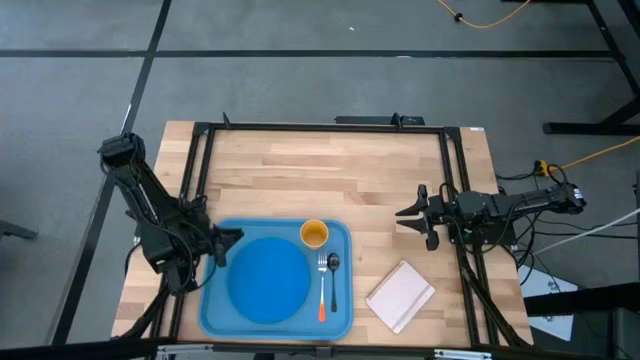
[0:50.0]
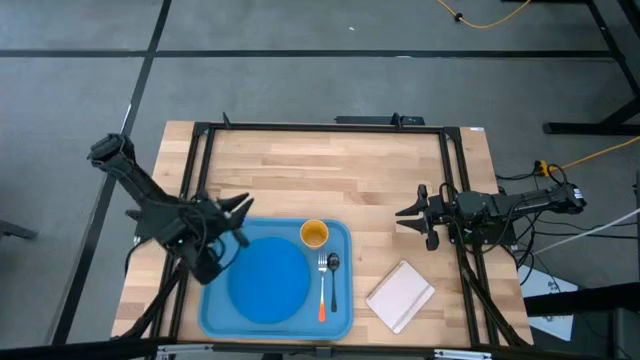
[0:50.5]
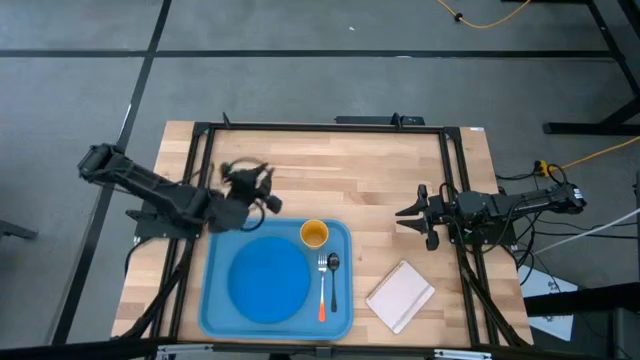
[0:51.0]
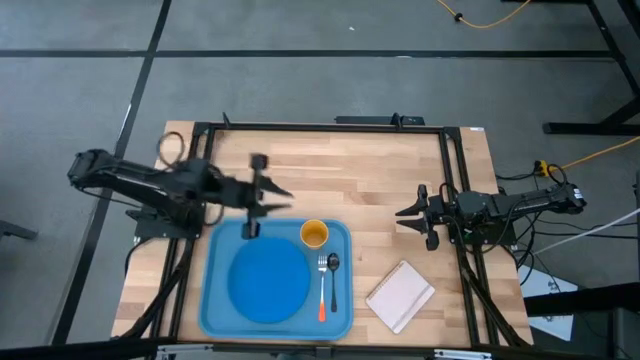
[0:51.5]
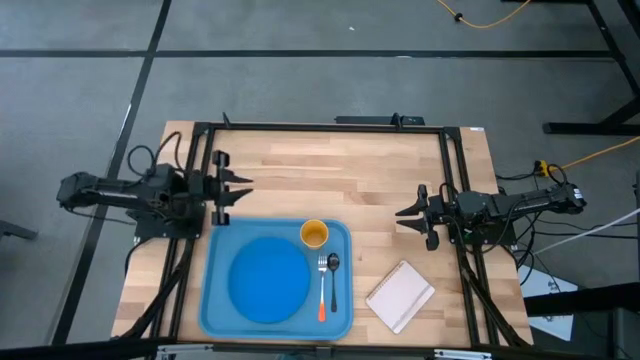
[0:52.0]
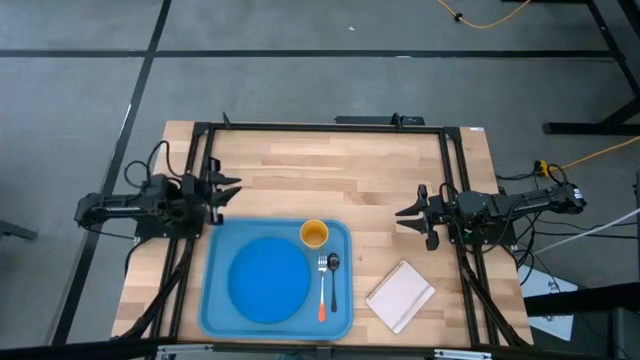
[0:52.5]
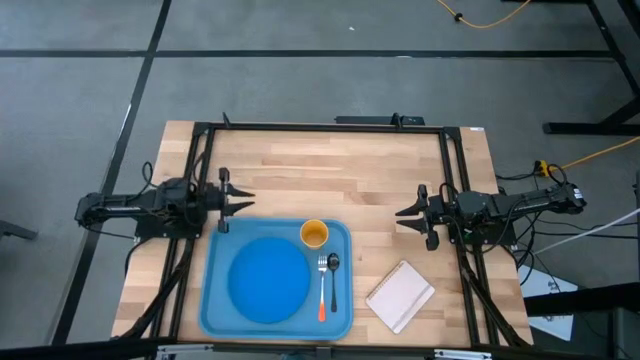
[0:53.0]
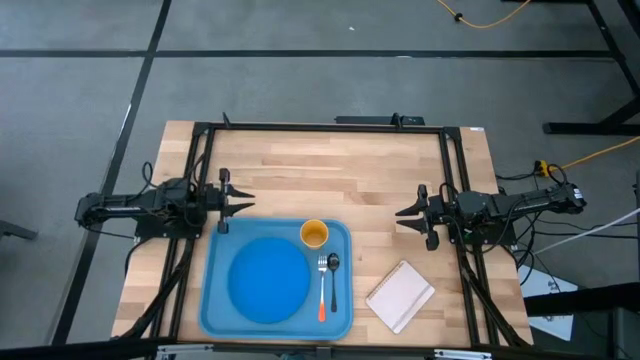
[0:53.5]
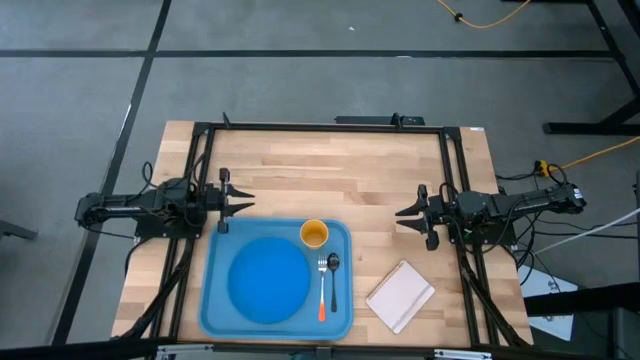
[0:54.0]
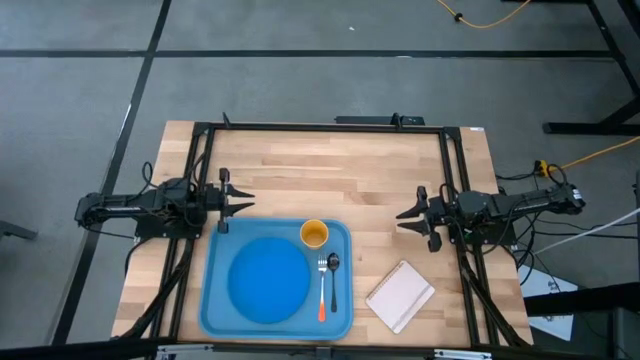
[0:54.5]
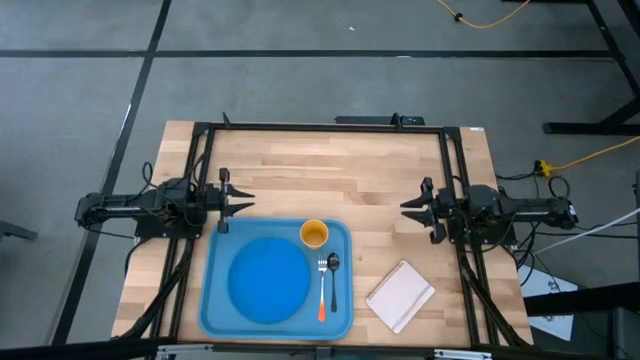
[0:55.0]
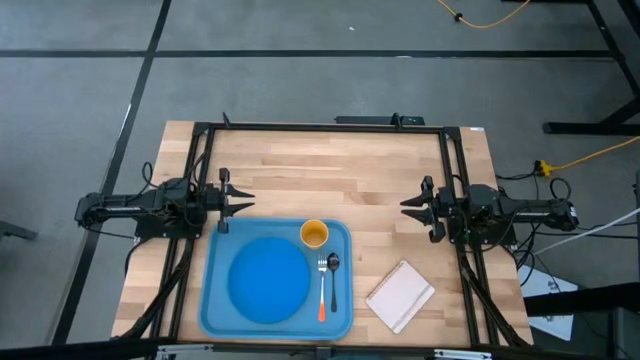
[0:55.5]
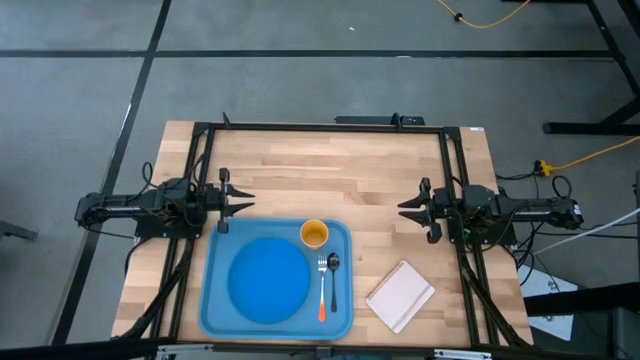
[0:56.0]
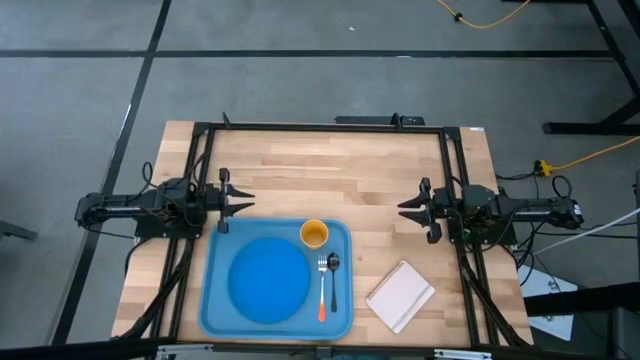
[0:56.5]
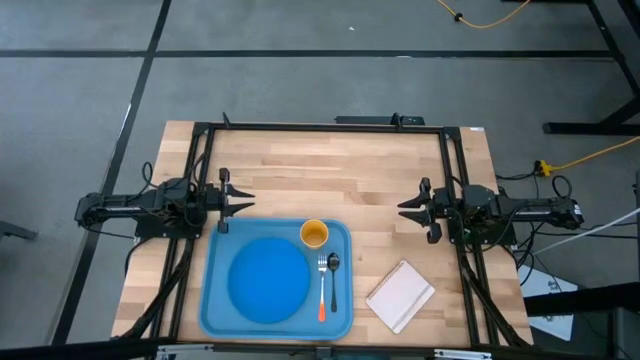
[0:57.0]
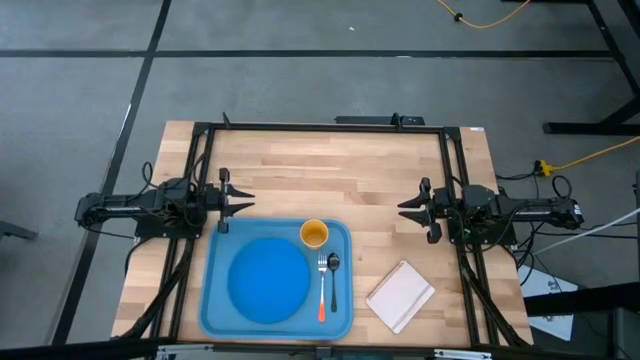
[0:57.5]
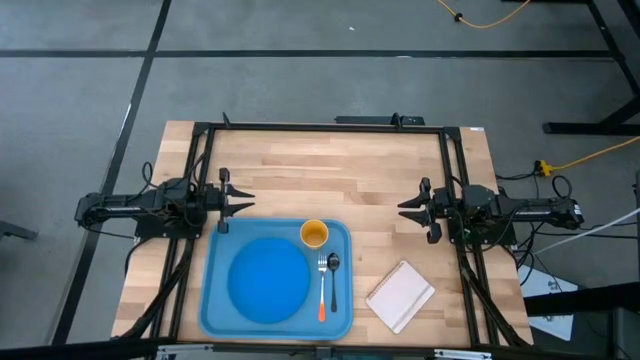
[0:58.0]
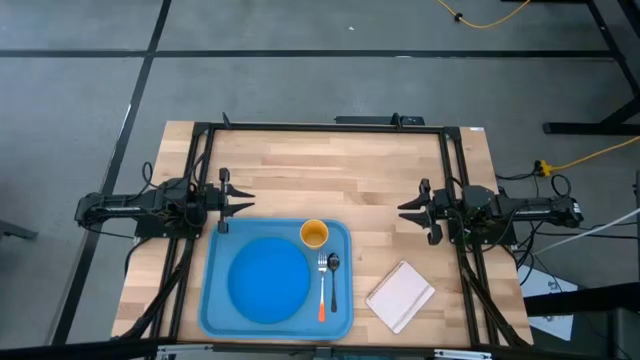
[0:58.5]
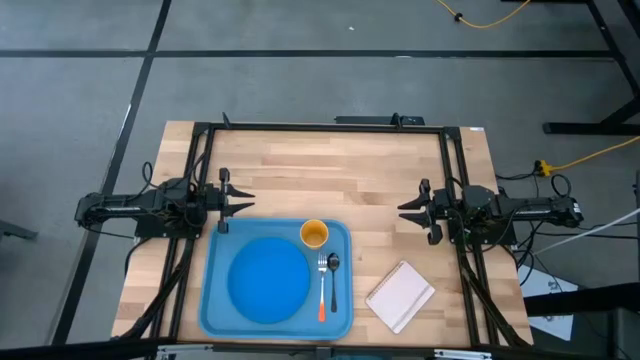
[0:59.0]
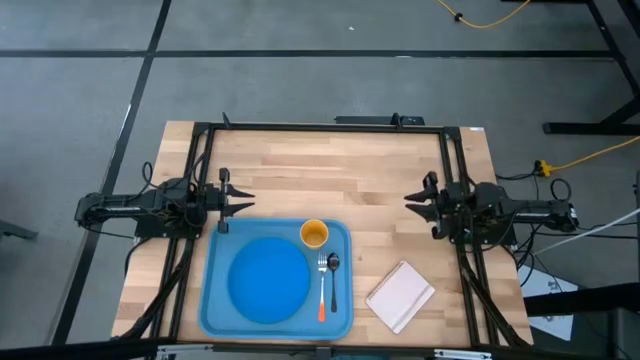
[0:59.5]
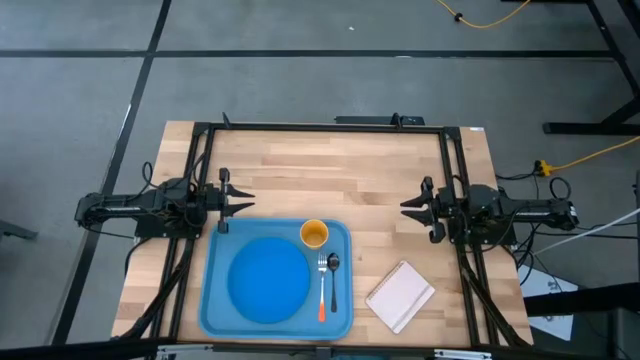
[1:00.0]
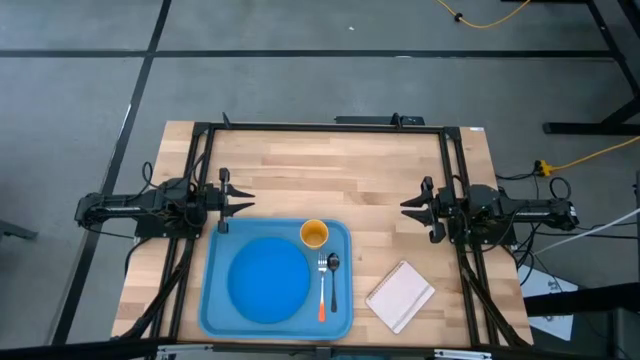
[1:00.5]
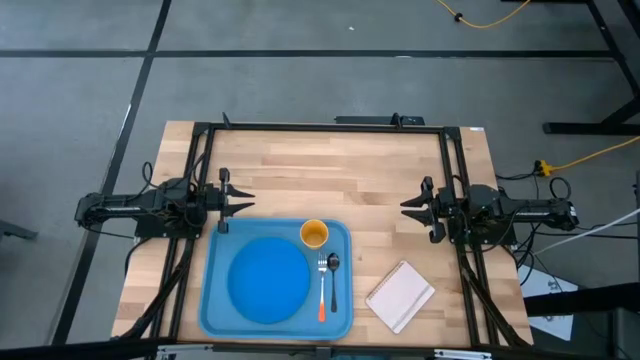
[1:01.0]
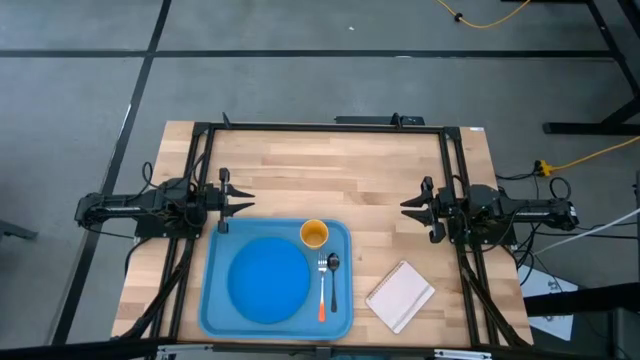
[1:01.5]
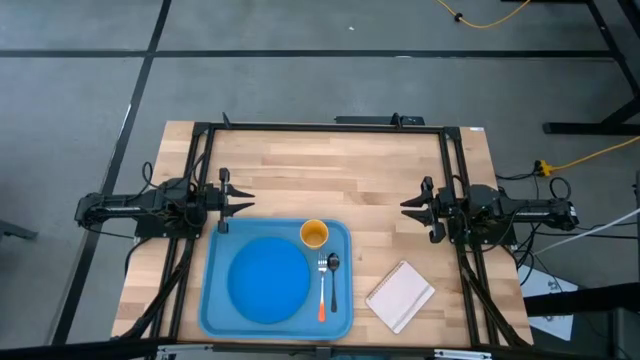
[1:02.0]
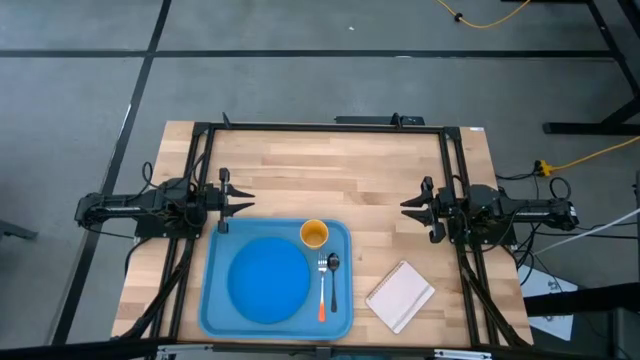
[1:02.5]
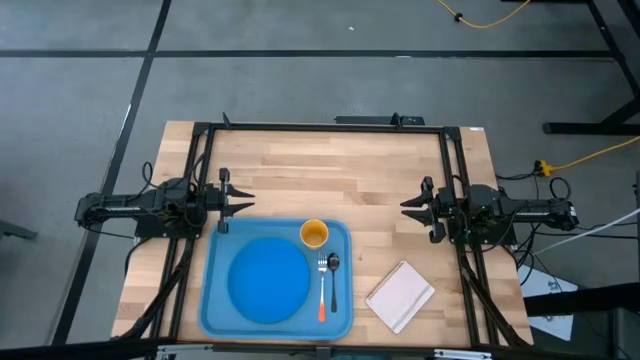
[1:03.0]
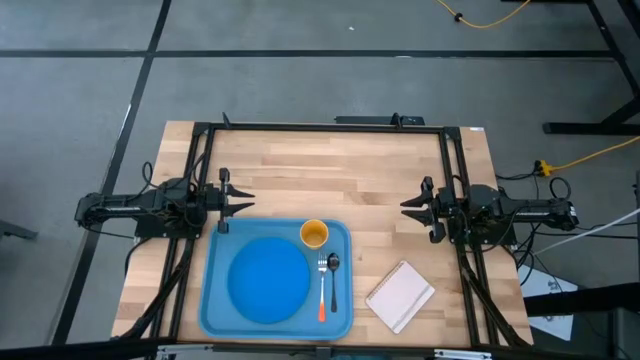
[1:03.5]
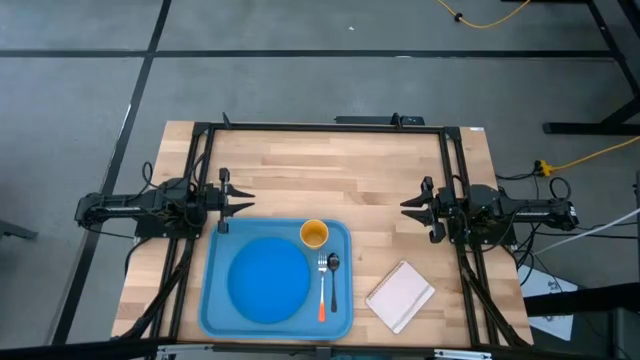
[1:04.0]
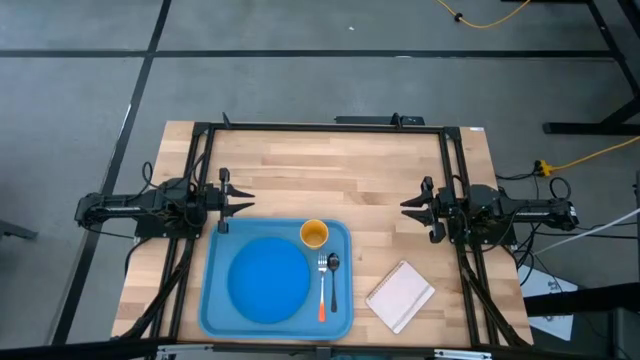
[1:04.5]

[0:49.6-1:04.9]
Task: Pick and place plate/cup/fork/spoon on tray
Return To Home Position
